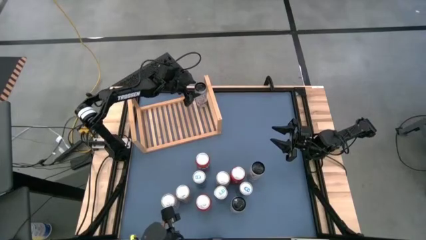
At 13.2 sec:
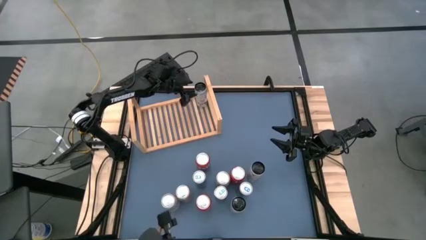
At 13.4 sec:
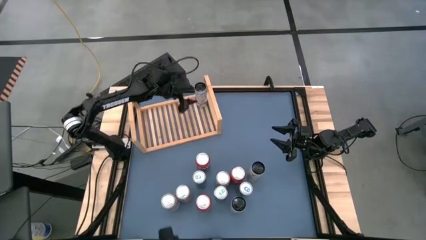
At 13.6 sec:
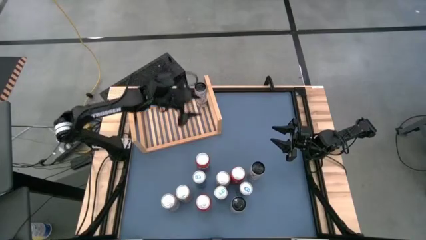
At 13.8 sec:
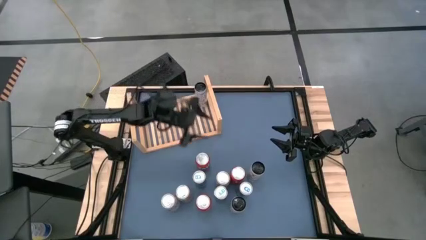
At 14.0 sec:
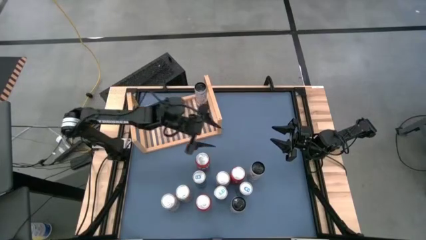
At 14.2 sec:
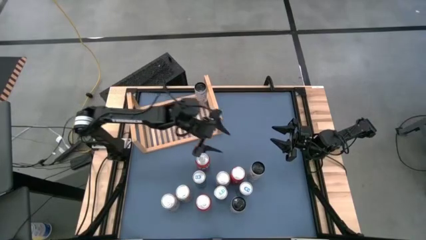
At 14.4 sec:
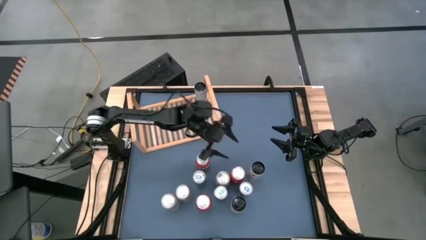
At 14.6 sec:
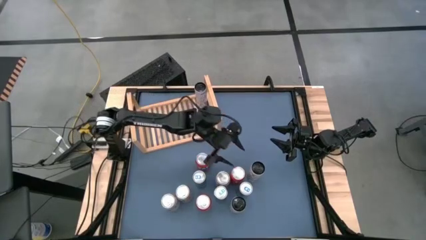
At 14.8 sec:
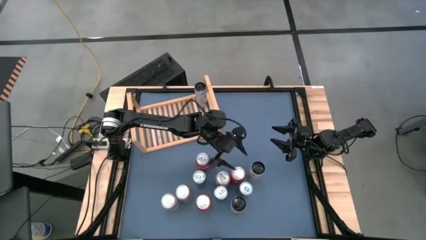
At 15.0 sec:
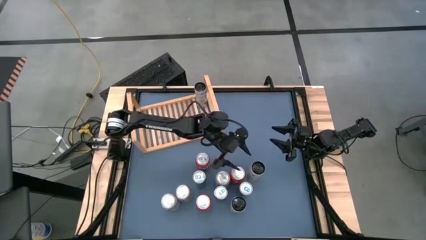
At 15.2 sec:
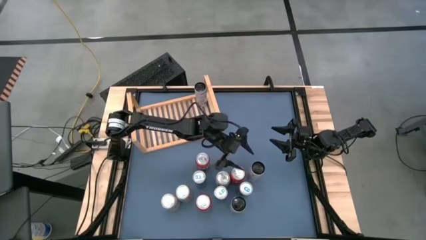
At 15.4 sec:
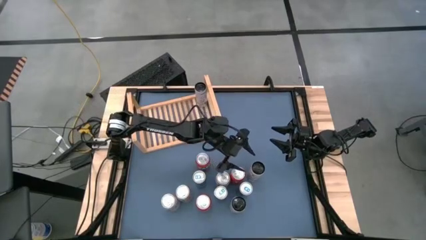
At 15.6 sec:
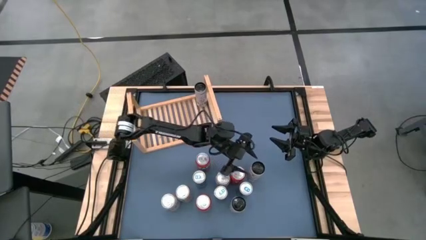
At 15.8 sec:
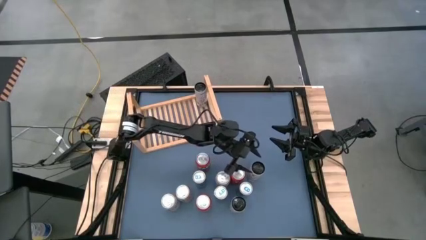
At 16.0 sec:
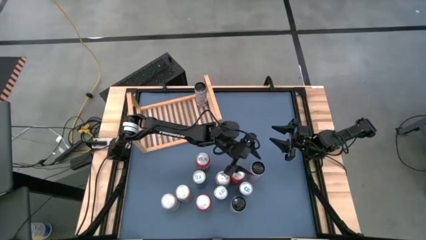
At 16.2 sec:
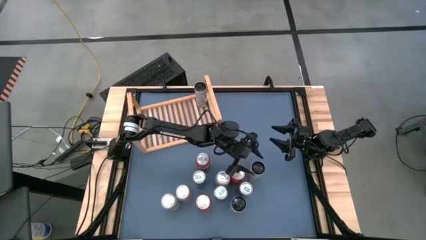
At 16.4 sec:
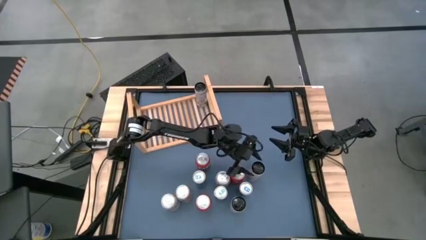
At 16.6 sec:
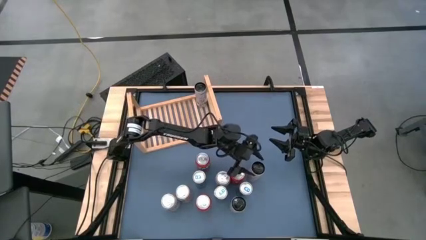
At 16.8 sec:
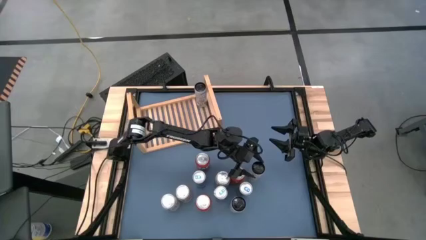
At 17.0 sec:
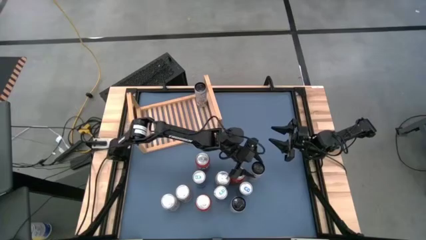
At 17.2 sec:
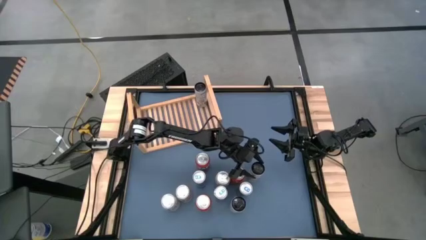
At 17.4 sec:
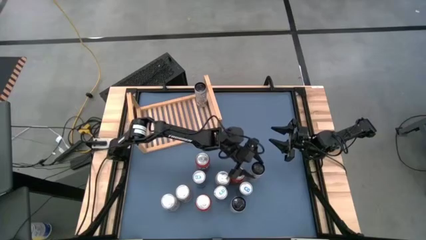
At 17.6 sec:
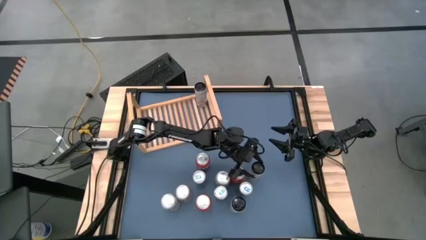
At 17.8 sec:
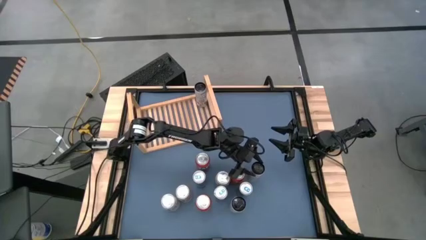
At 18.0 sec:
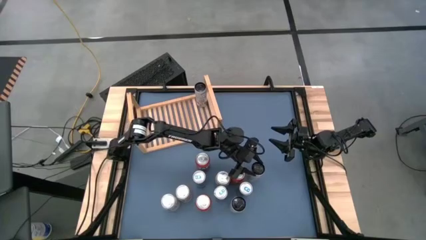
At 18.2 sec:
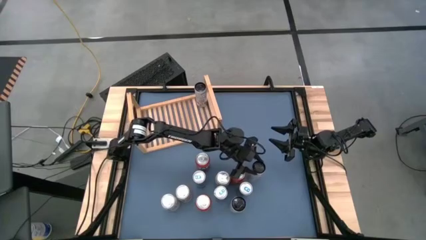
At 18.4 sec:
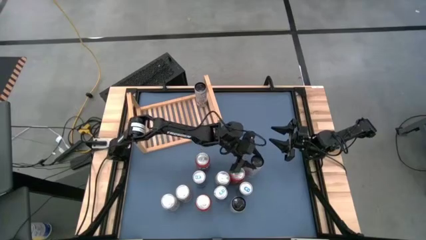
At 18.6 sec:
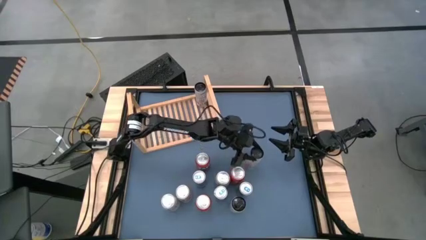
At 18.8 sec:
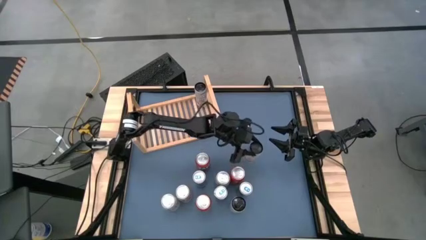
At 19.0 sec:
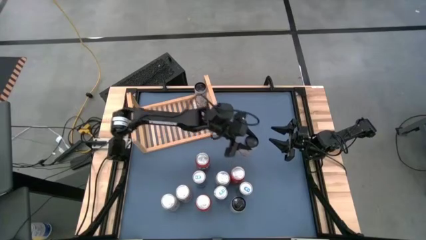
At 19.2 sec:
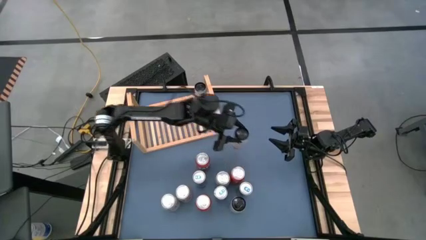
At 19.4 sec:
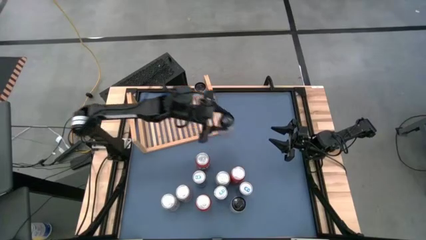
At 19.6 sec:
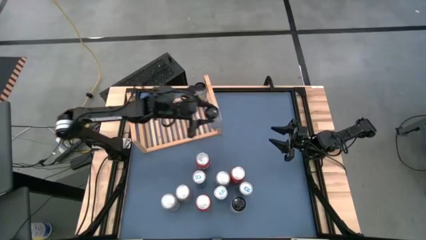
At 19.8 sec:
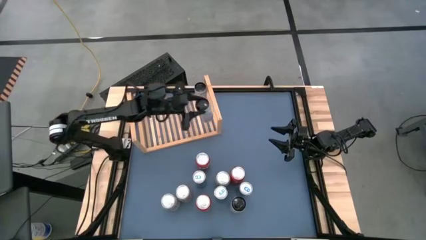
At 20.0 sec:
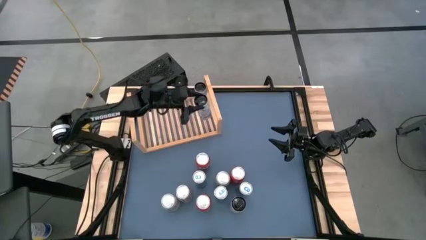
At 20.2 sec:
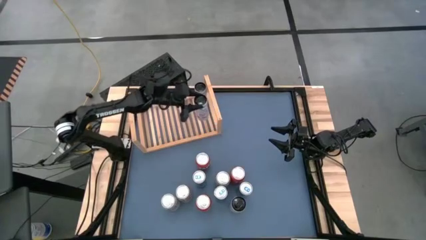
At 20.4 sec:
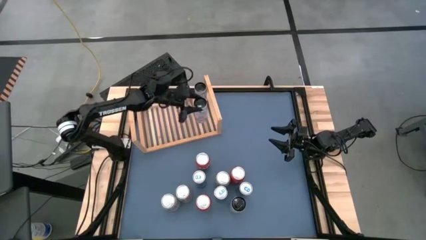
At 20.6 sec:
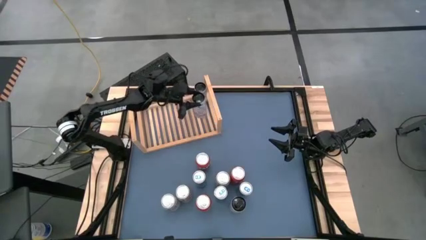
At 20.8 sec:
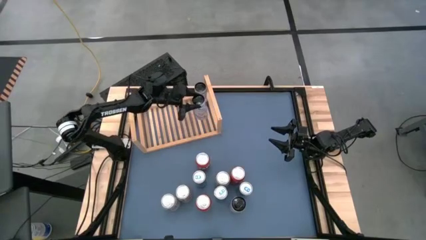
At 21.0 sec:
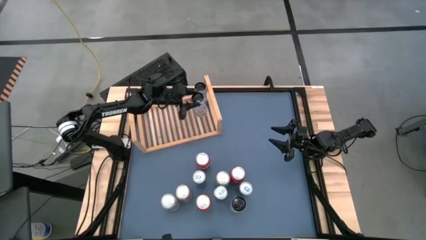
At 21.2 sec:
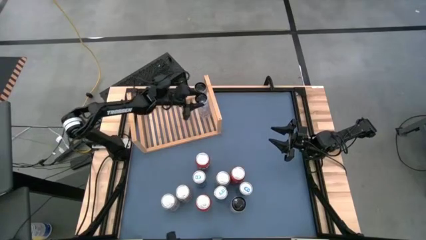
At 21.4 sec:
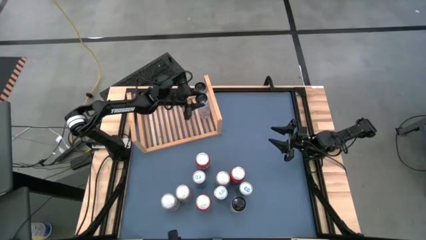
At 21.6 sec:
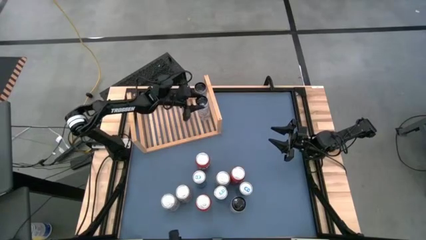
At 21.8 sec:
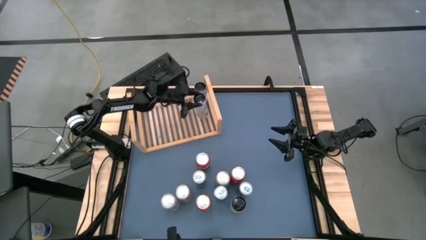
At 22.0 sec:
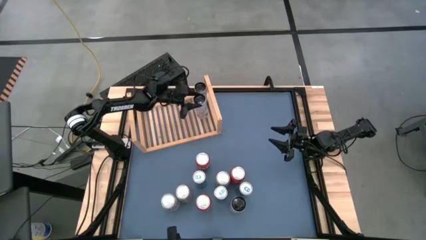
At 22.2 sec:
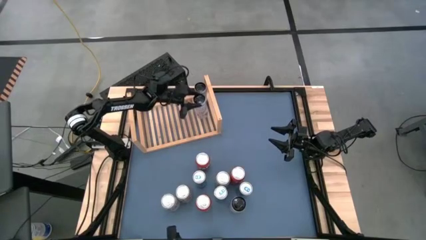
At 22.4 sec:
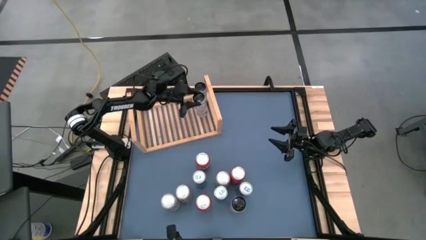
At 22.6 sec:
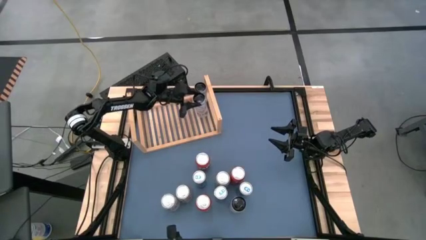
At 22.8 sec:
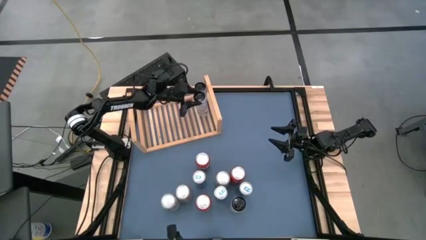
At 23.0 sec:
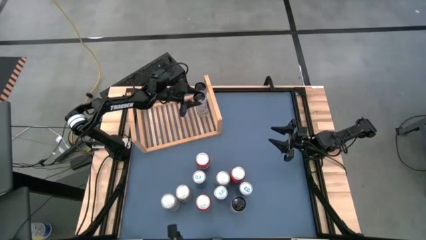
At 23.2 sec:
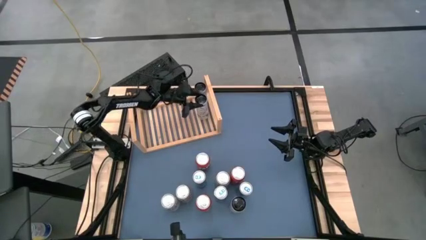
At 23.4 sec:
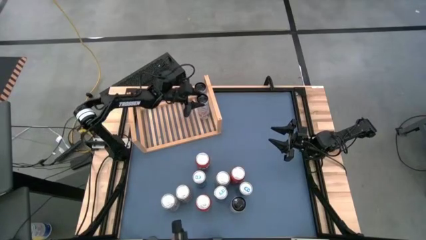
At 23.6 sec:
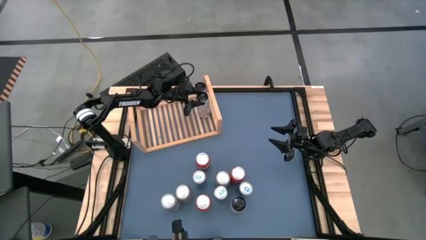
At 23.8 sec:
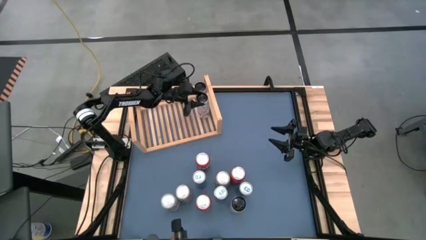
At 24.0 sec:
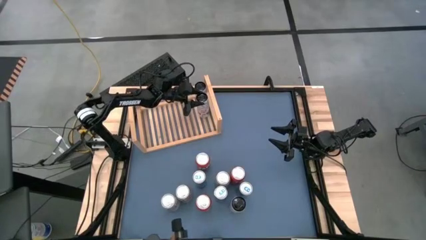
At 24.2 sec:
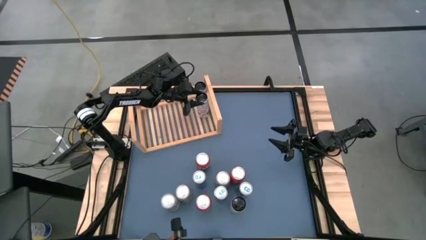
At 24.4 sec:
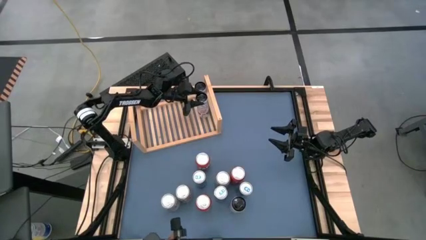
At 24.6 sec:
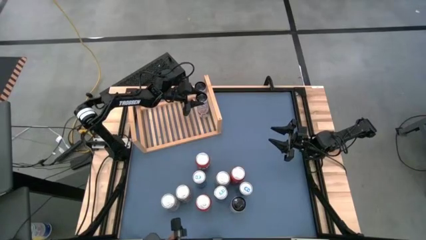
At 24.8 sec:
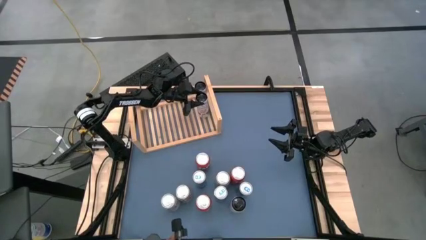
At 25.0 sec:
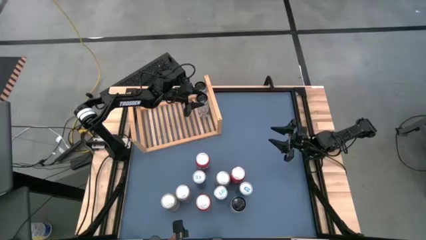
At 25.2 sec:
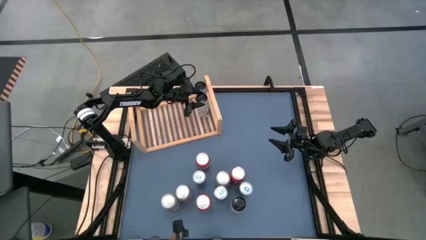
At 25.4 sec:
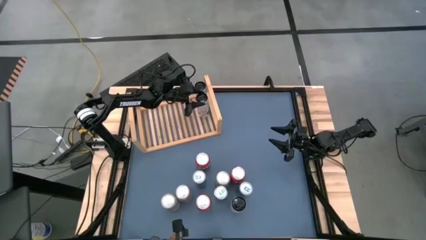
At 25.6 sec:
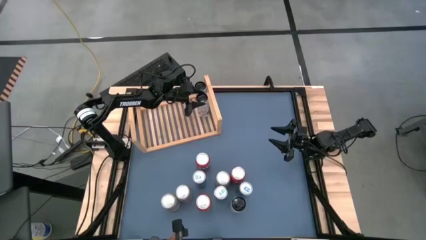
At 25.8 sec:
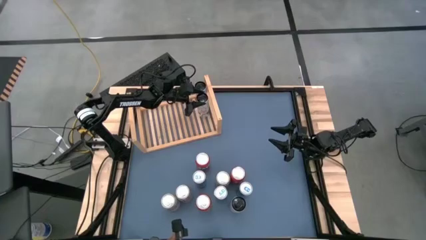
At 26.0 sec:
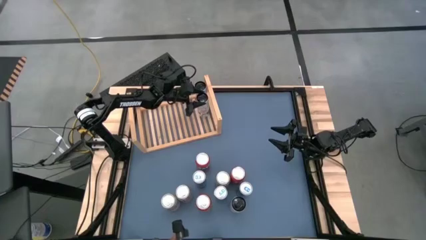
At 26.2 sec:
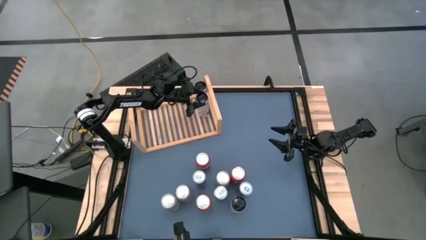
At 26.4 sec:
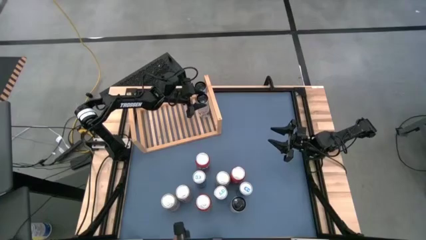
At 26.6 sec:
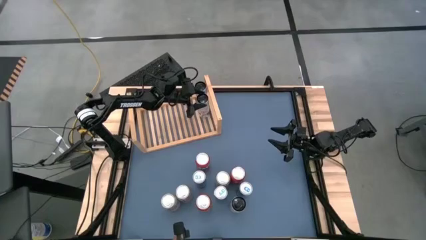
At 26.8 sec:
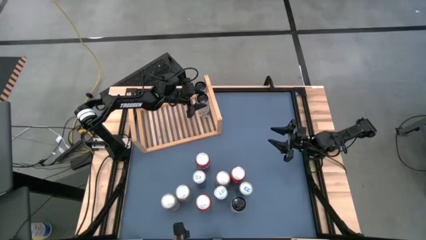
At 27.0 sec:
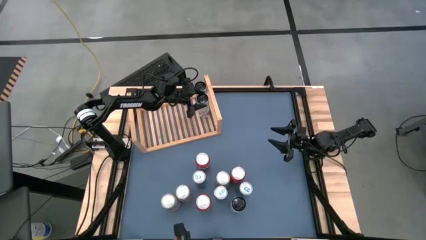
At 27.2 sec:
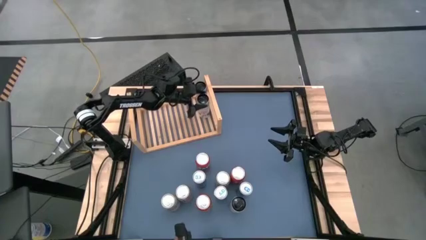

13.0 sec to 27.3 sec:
Task: Place canned beverage on shelf
Put the top white pink soda can on the shelf aligned with the other white pink soda can
